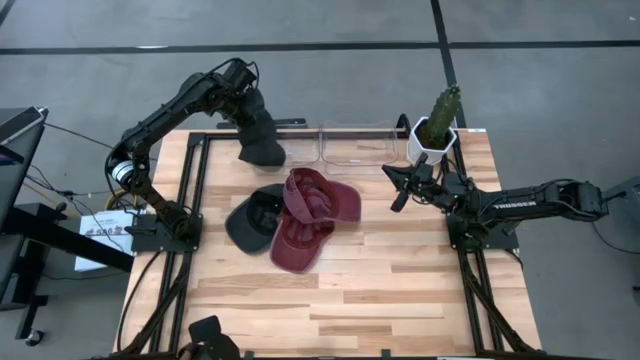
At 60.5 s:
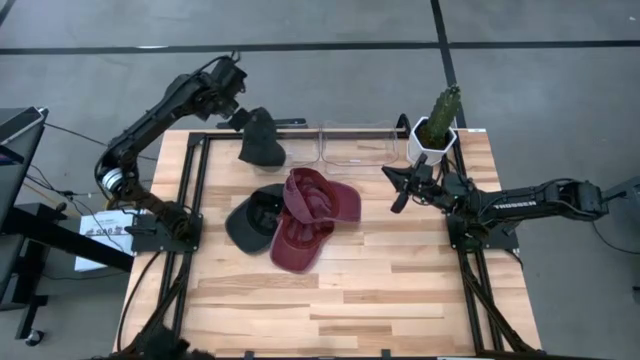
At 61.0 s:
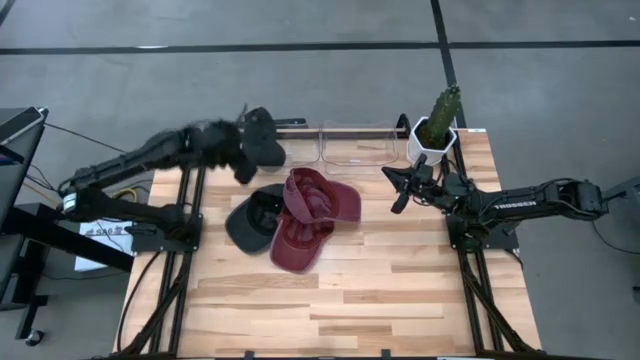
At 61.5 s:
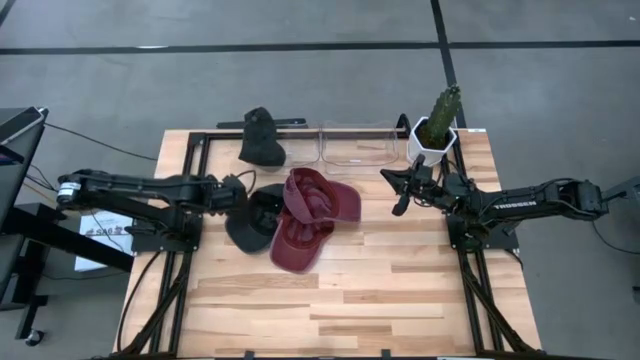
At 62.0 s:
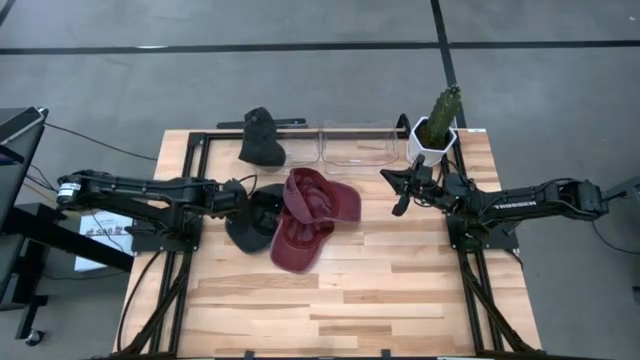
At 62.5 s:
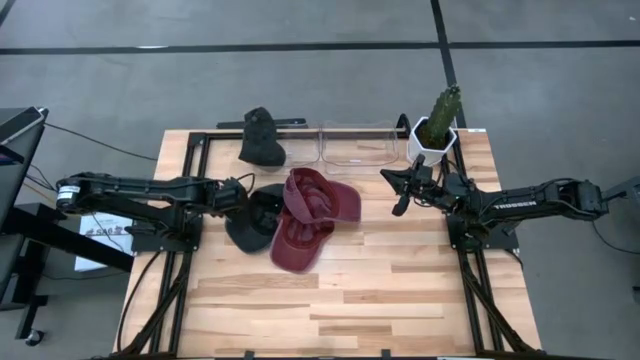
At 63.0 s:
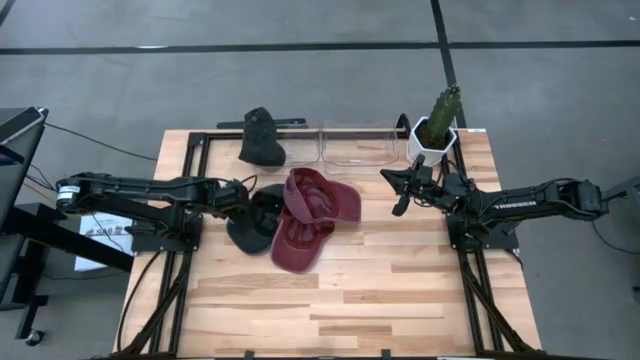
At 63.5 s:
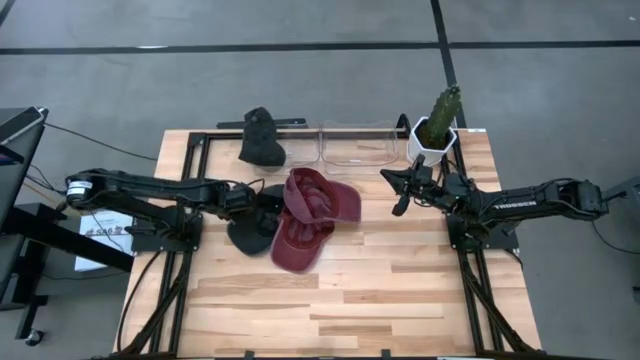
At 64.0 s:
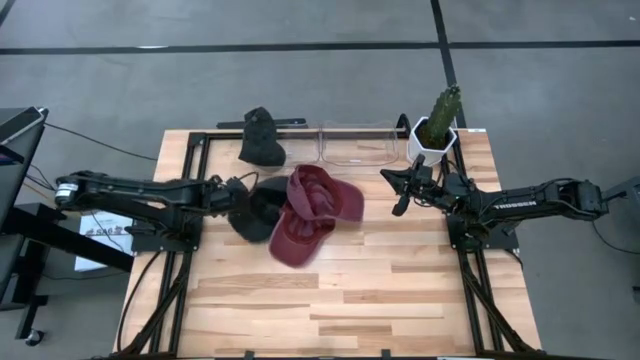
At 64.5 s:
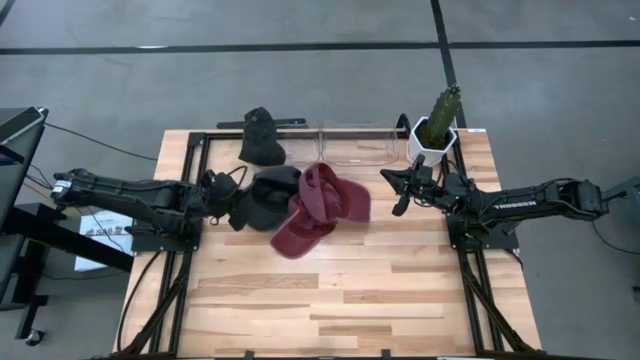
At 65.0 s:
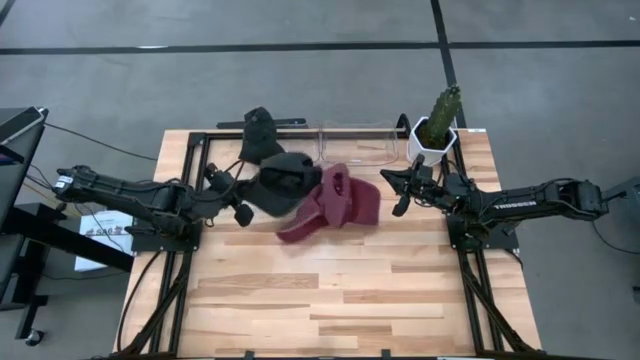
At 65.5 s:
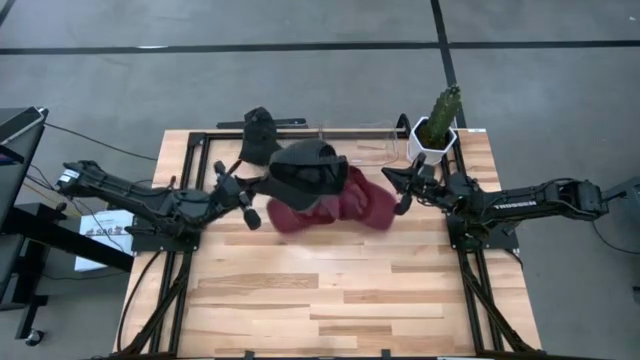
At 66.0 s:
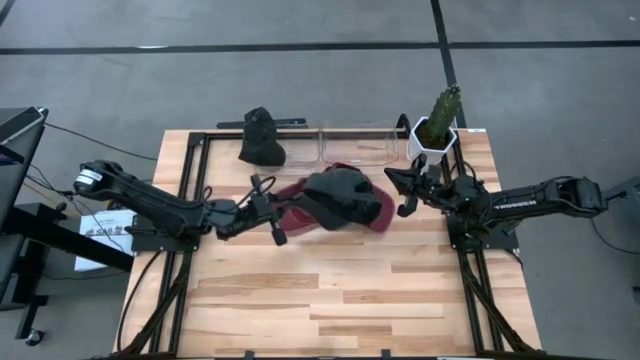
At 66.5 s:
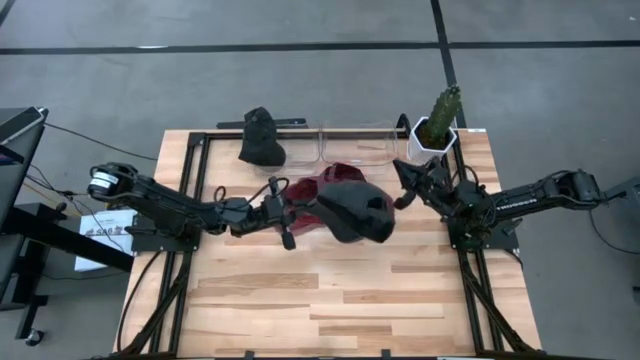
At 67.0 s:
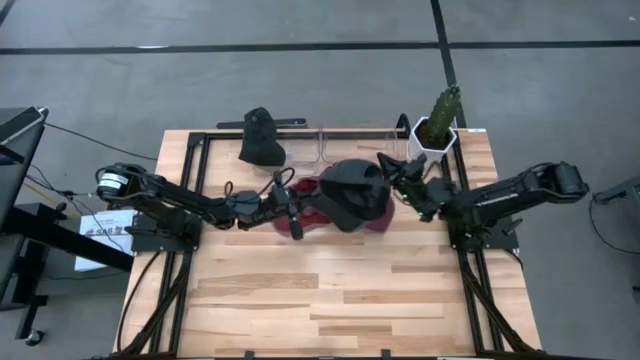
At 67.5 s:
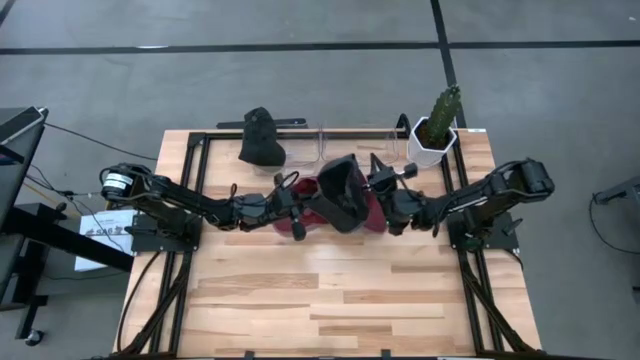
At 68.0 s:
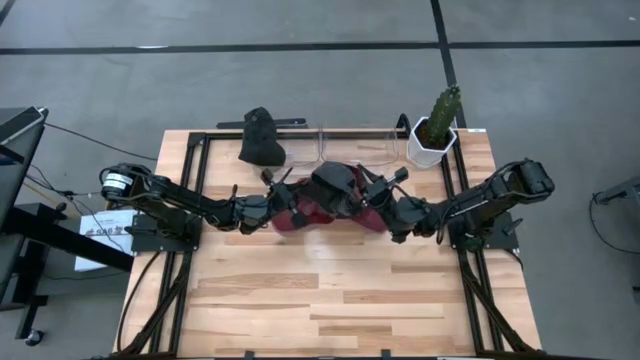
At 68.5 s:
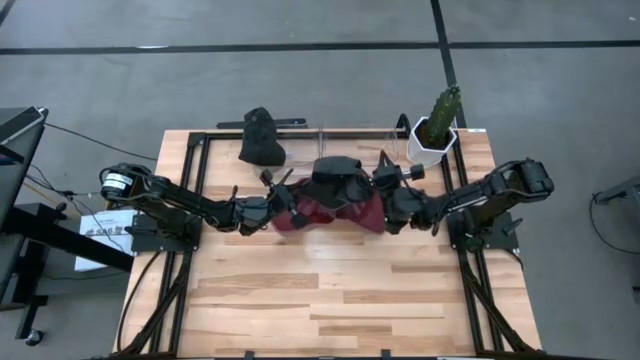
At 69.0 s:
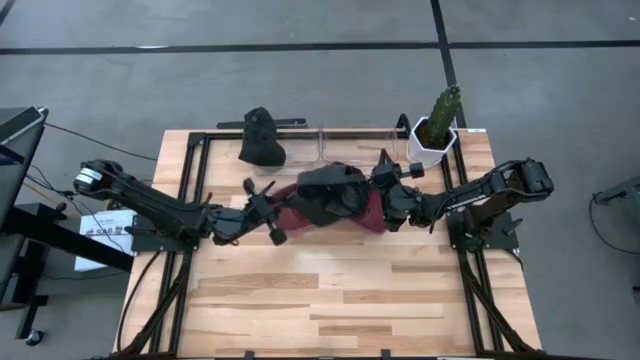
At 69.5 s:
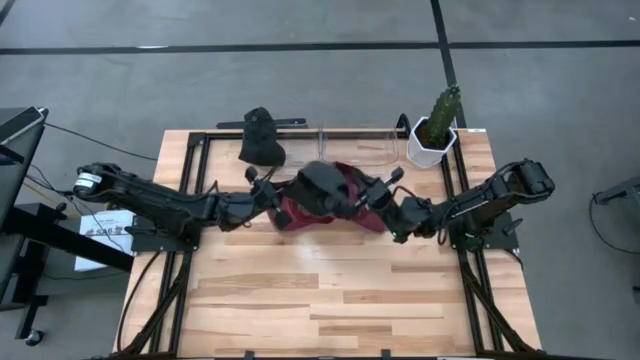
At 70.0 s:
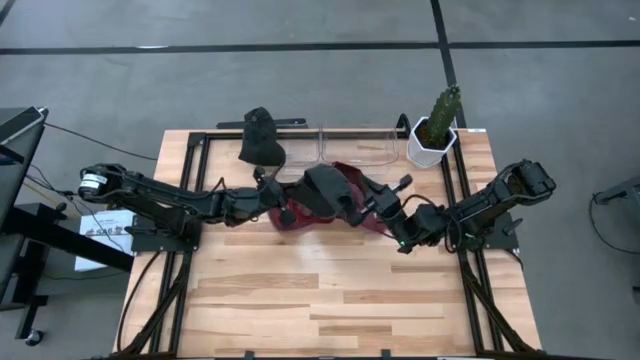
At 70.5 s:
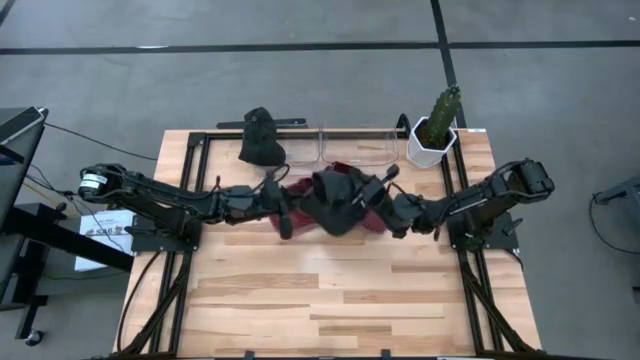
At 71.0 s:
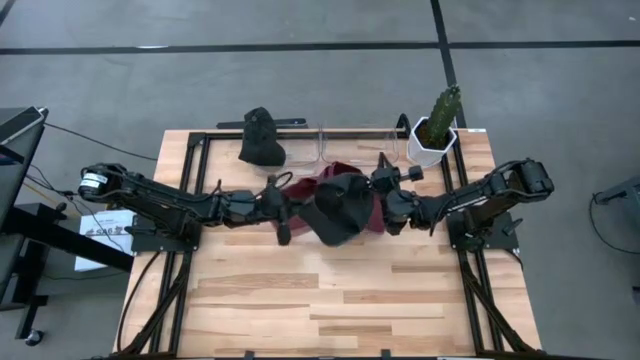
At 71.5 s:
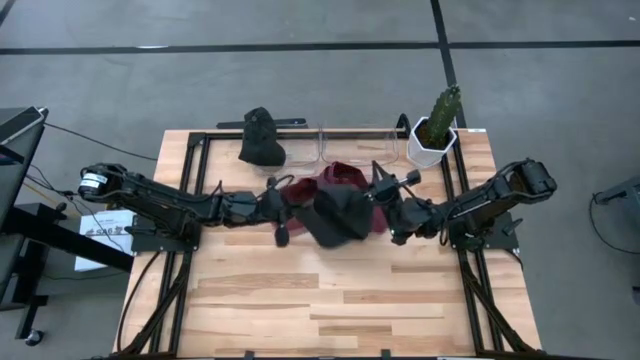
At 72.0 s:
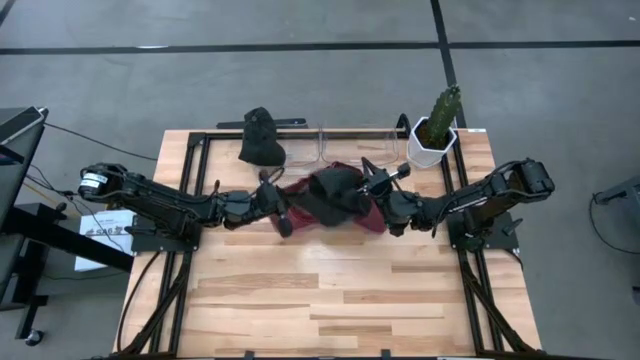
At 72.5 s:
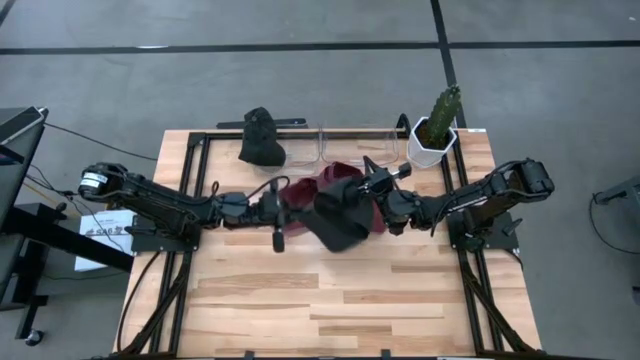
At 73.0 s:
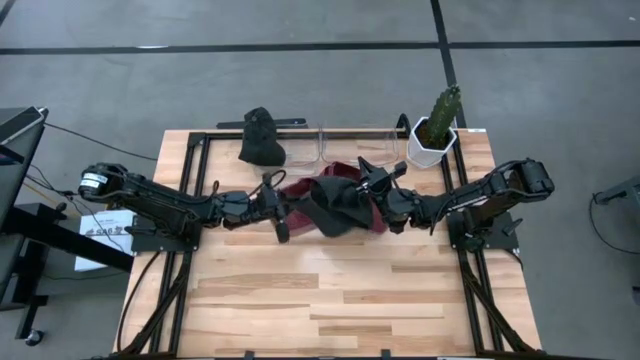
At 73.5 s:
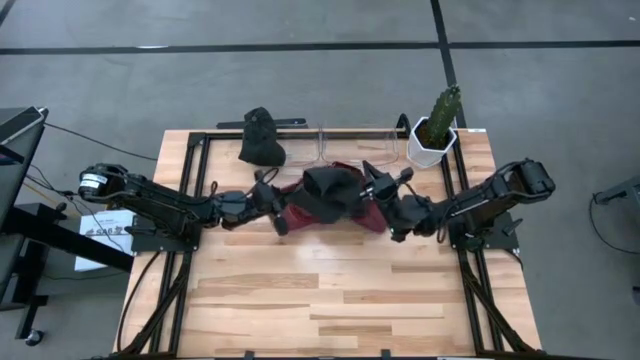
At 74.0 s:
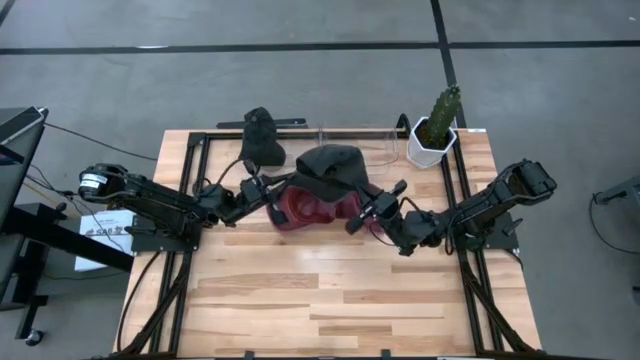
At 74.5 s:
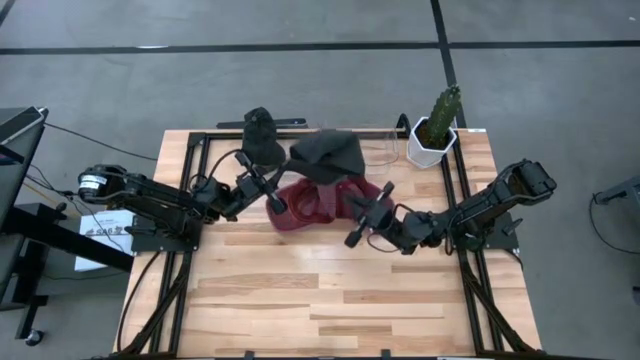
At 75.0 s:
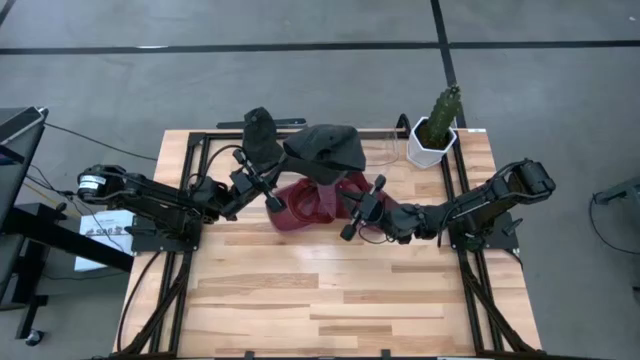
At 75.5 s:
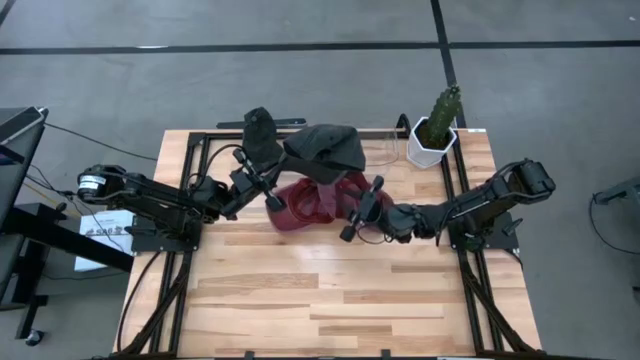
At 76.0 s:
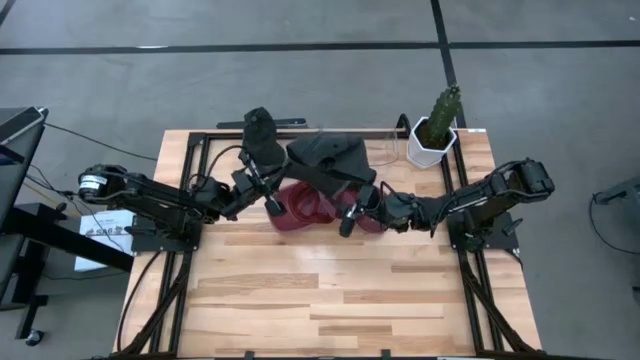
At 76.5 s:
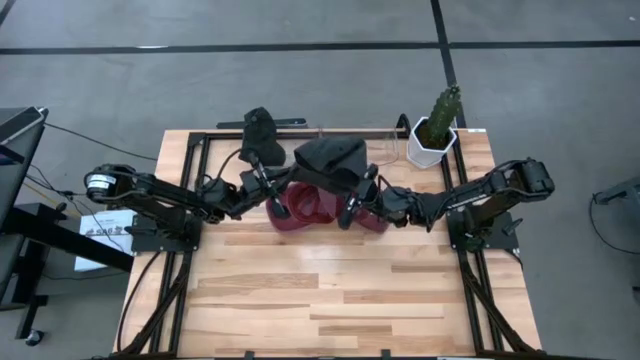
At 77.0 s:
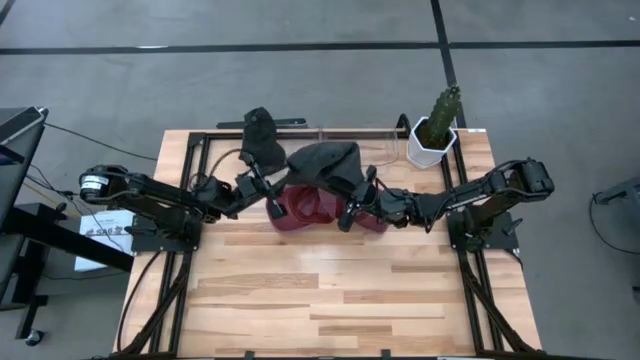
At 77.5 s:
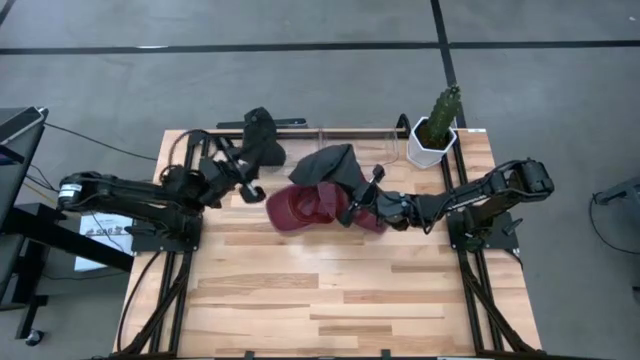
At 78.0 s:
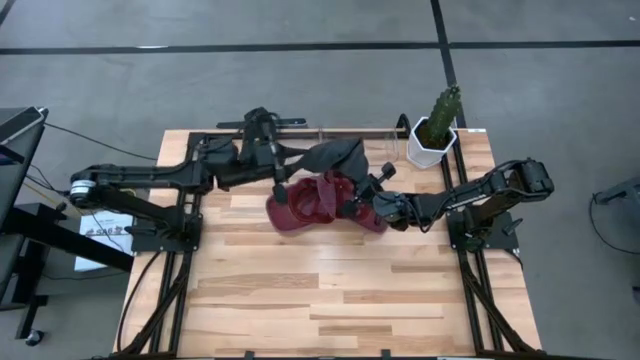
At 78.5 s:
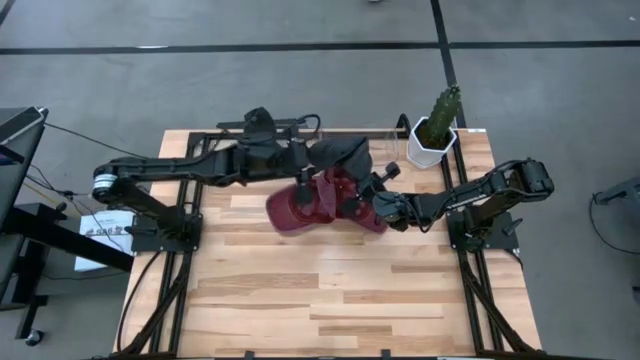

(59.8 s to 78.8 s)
Task: Pick & Place hat
Put the black cap into the left transparent bin
